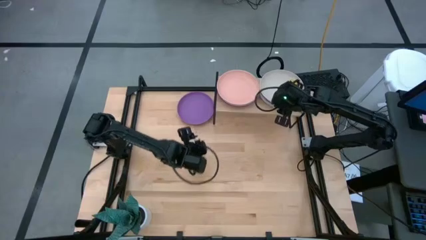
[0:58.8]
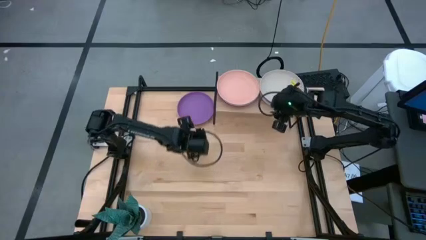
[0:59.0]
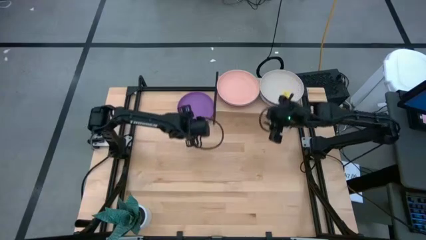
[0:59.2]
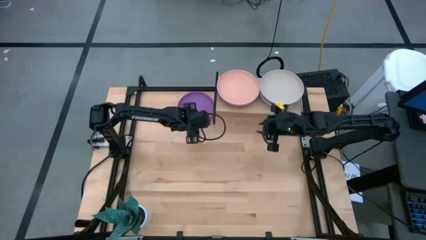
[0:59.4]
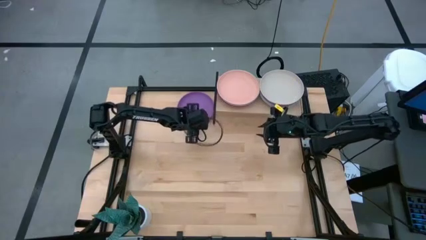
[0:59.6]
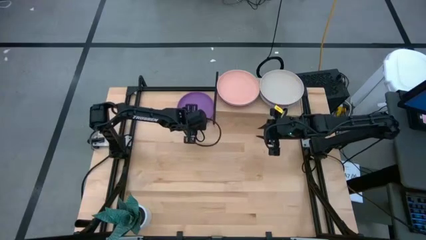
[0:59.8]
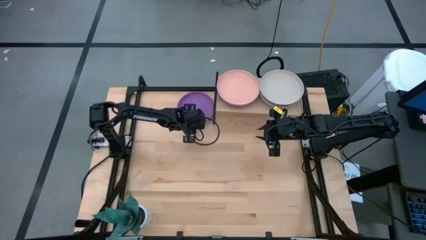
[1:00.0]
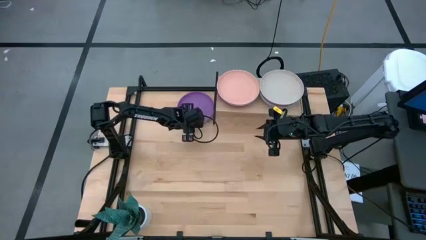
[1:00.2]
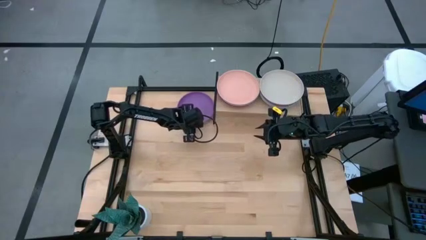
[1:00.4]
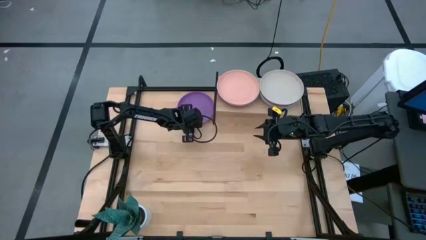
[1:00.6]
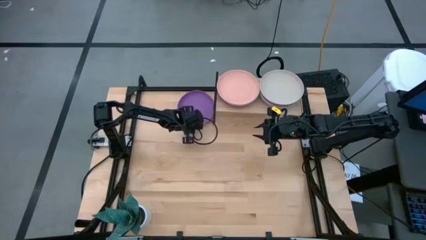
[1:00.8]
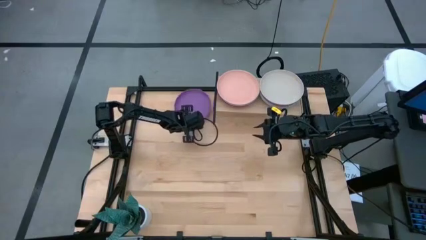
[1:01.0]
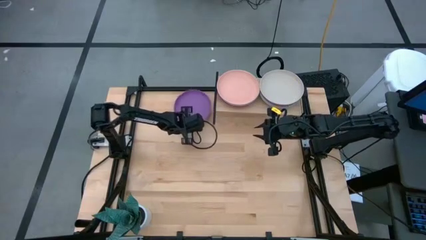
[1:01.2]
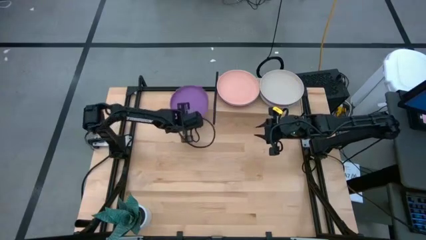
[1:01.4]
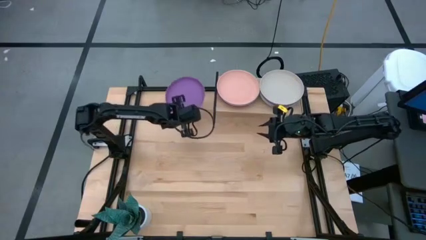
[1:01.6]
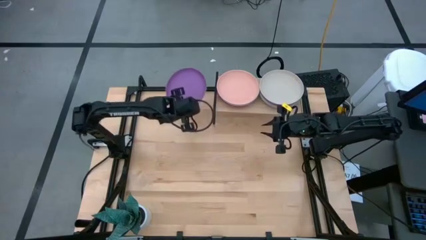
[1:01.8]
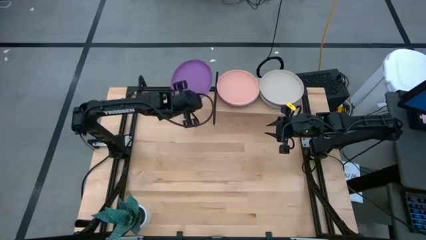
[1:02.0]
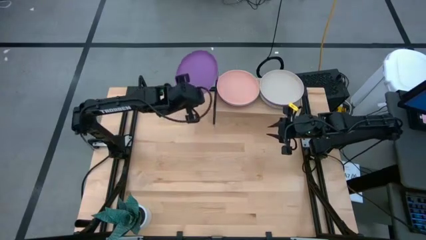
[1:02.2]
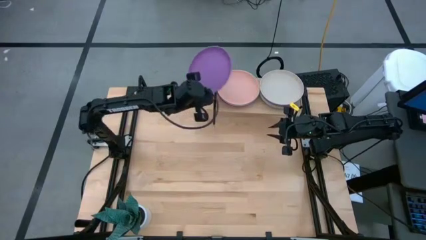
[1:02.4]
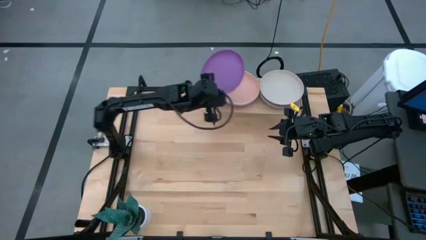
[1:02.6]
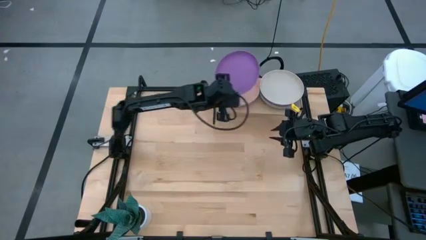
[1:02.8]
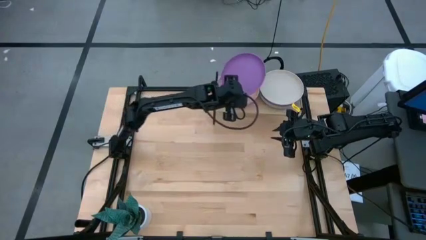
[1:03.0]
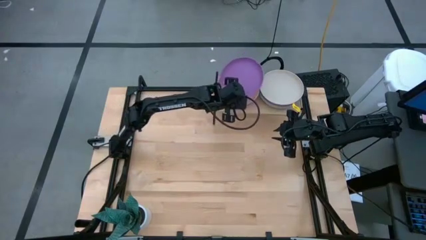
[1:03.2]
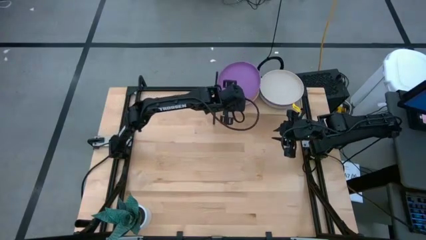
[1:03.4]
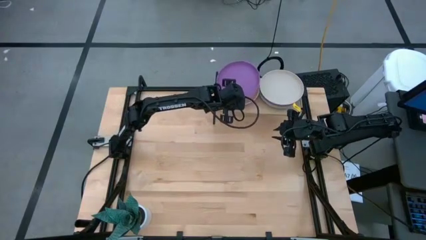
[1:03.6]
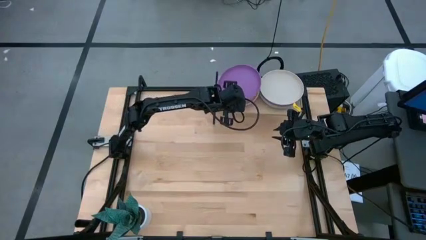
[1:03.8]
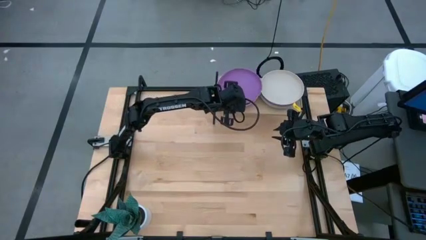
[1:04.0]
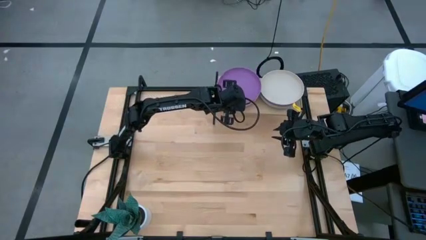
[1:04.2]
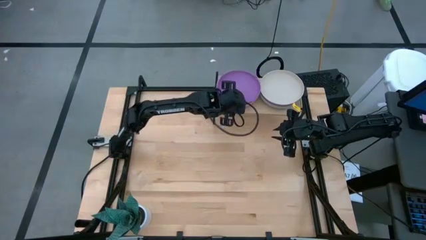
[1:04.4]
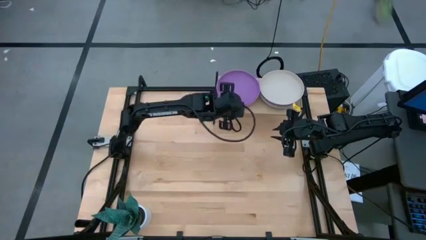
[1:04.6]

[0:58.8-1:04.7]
Task: Place and stack plates onto a shelf
Stack the violet plate on top of the light orange plate on the shelf

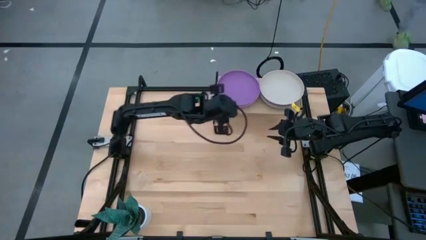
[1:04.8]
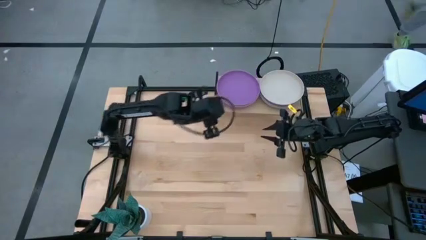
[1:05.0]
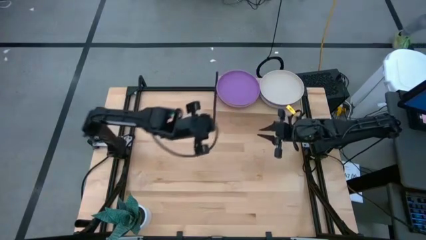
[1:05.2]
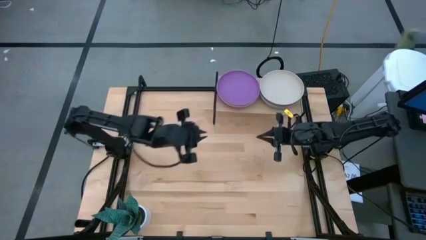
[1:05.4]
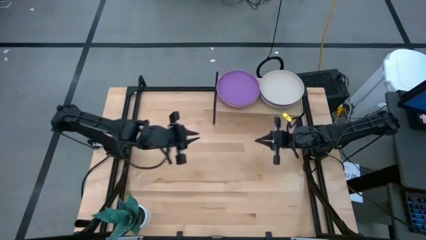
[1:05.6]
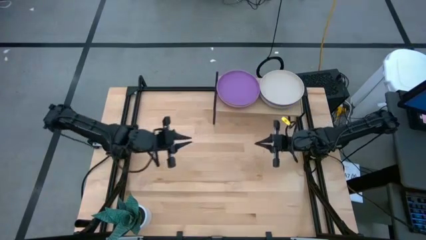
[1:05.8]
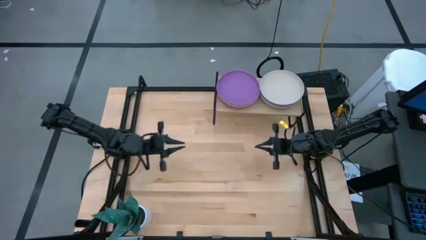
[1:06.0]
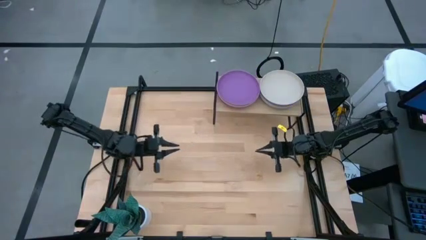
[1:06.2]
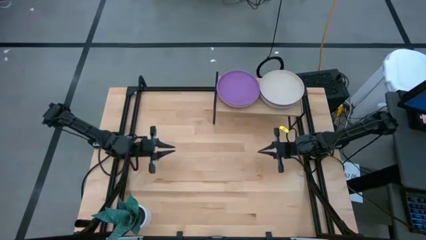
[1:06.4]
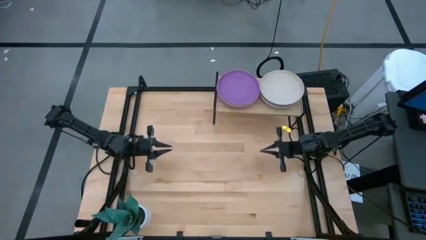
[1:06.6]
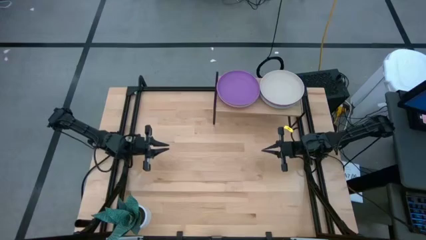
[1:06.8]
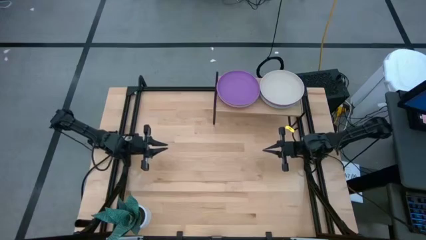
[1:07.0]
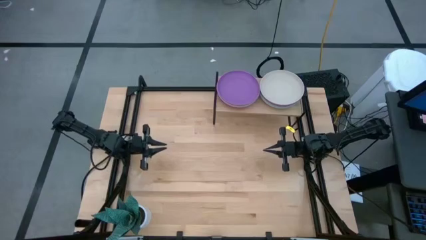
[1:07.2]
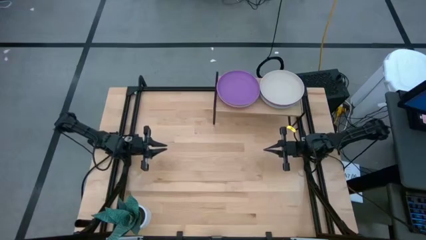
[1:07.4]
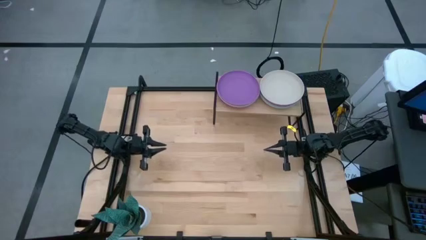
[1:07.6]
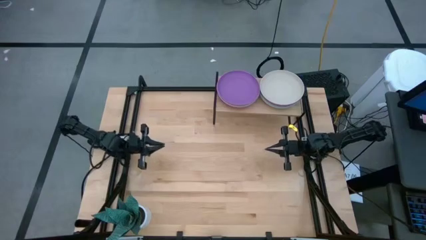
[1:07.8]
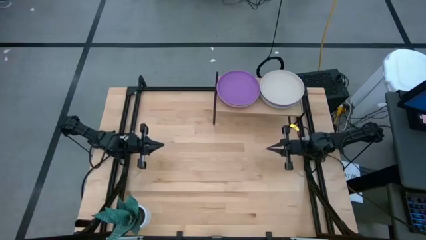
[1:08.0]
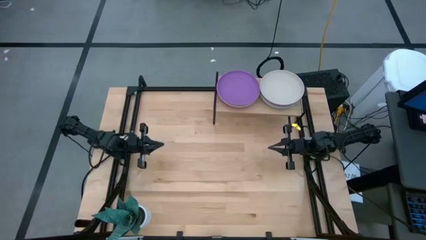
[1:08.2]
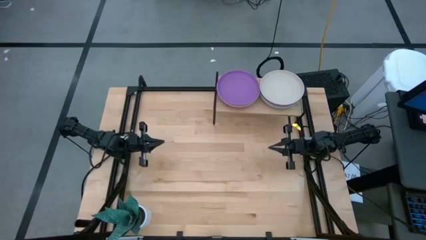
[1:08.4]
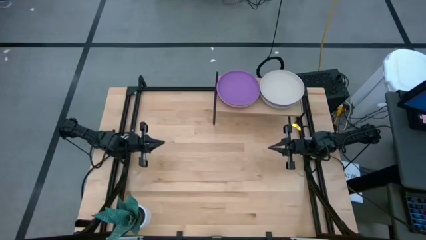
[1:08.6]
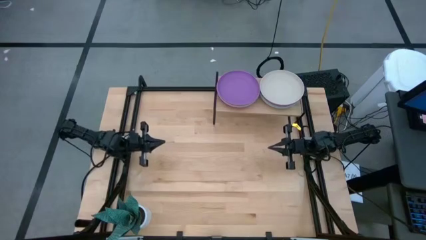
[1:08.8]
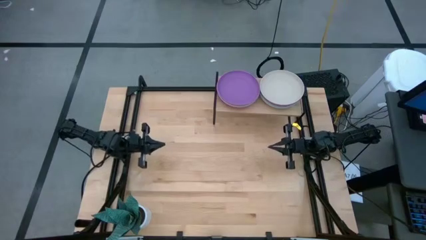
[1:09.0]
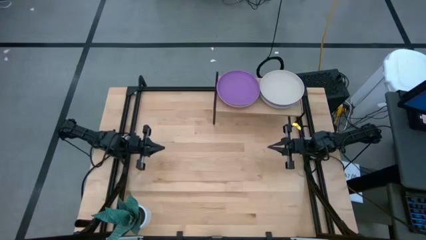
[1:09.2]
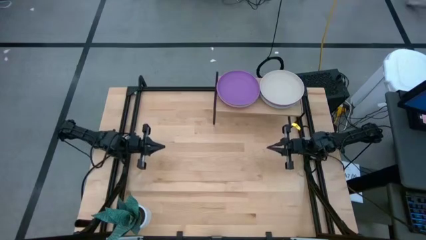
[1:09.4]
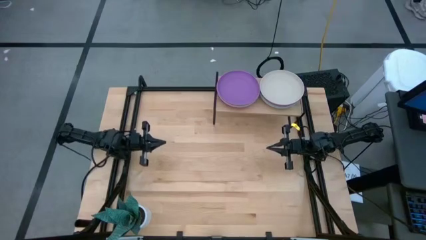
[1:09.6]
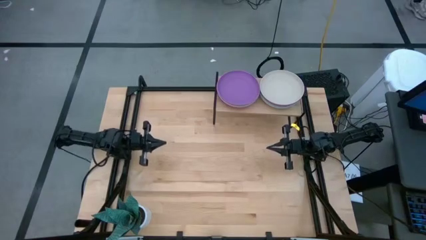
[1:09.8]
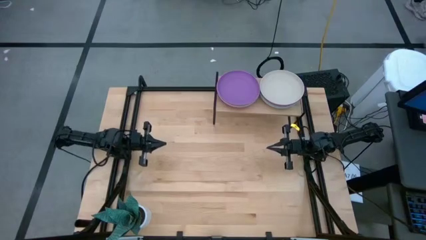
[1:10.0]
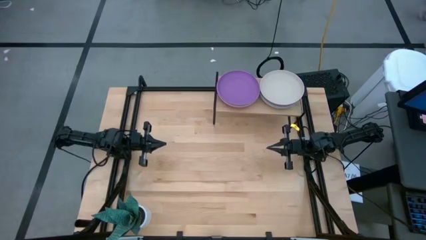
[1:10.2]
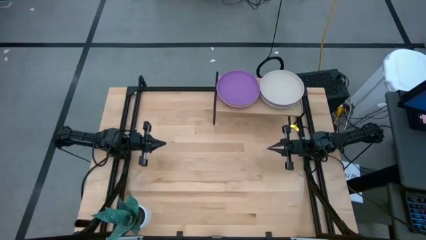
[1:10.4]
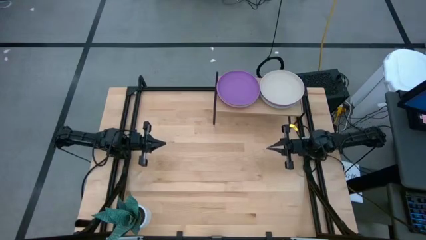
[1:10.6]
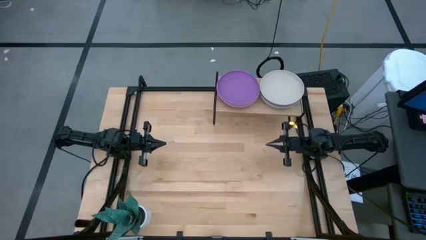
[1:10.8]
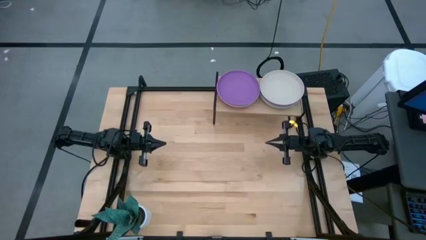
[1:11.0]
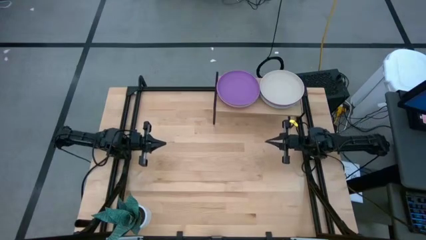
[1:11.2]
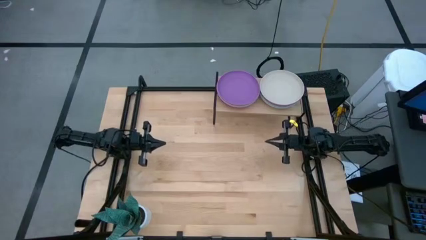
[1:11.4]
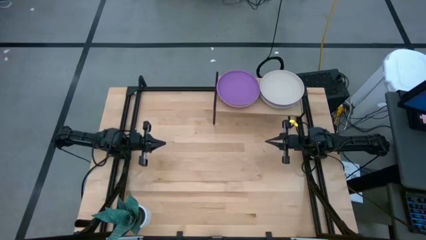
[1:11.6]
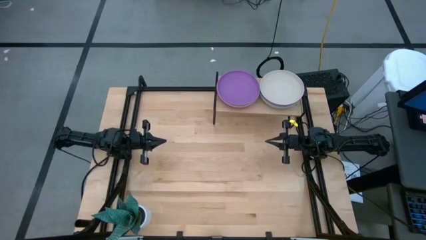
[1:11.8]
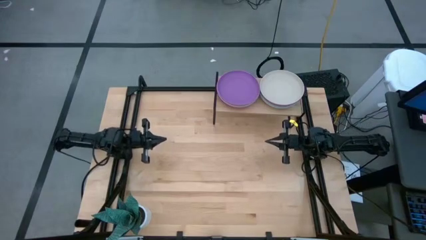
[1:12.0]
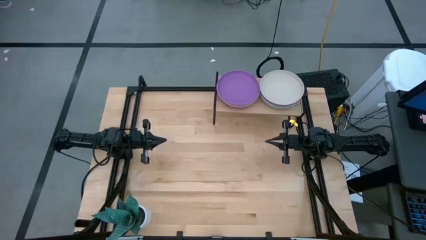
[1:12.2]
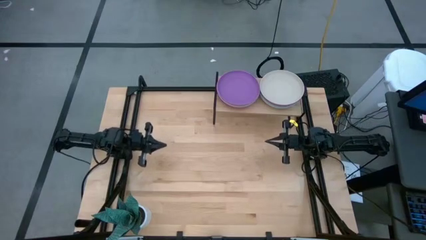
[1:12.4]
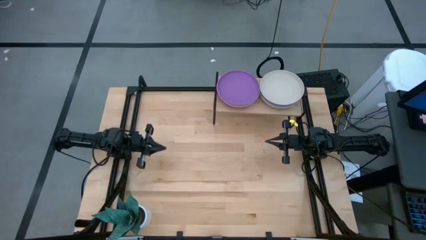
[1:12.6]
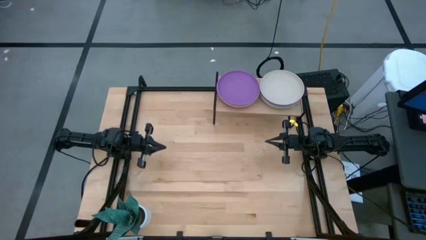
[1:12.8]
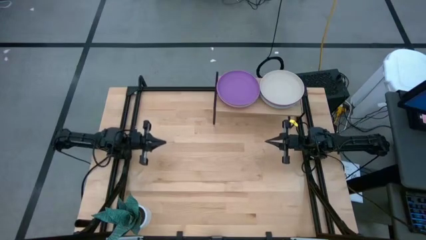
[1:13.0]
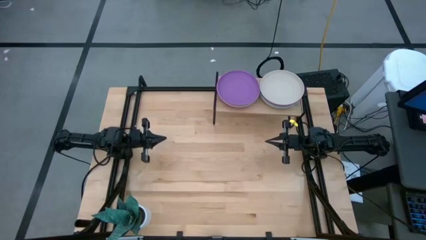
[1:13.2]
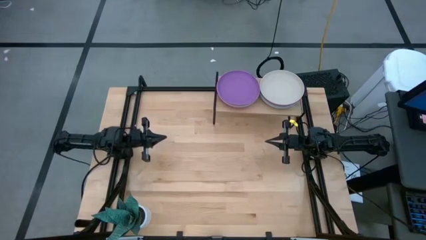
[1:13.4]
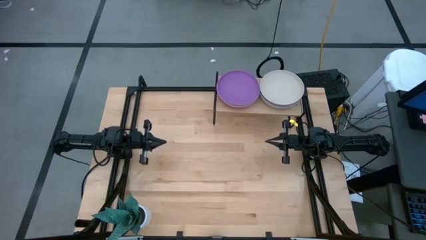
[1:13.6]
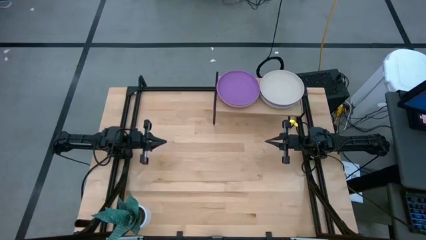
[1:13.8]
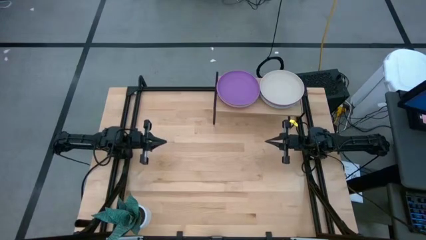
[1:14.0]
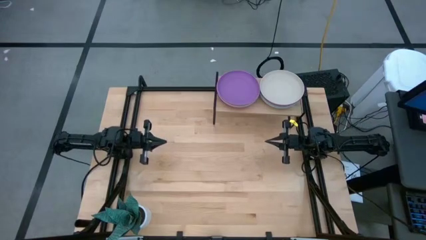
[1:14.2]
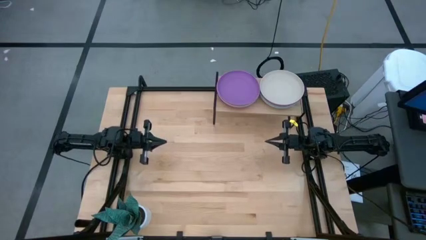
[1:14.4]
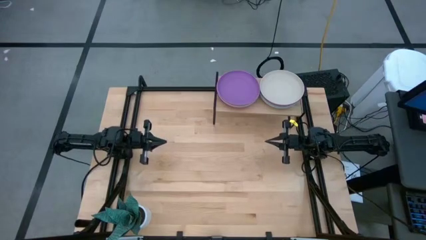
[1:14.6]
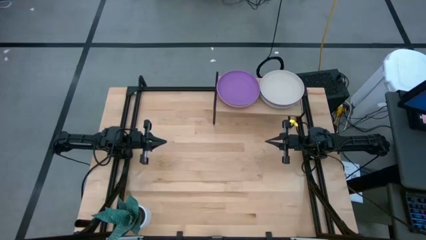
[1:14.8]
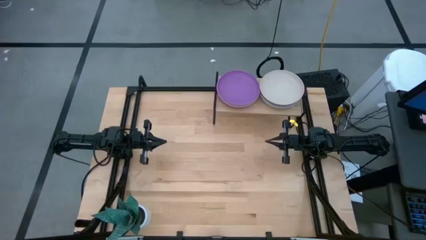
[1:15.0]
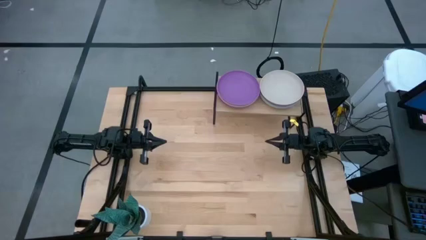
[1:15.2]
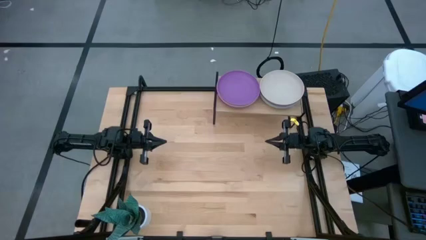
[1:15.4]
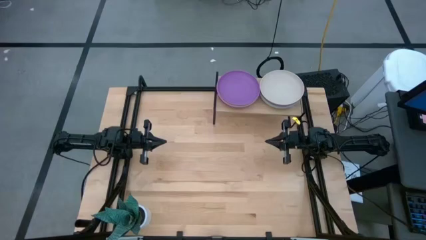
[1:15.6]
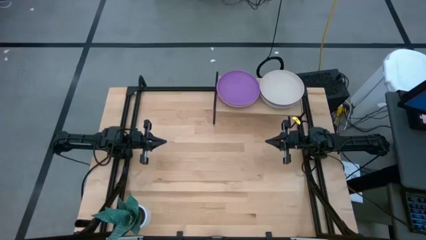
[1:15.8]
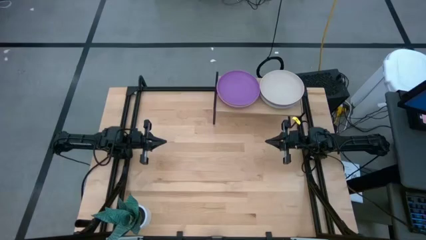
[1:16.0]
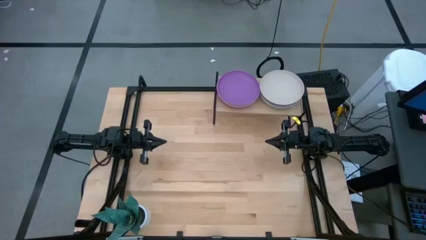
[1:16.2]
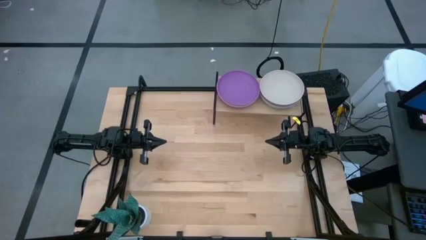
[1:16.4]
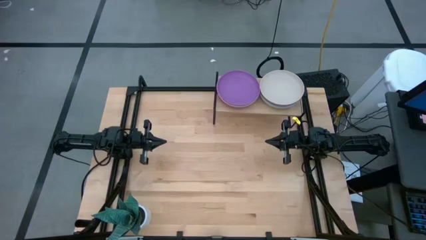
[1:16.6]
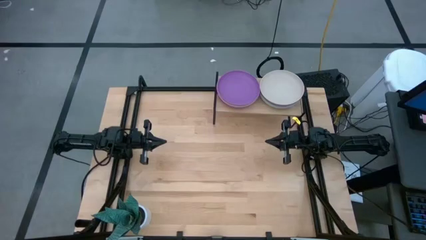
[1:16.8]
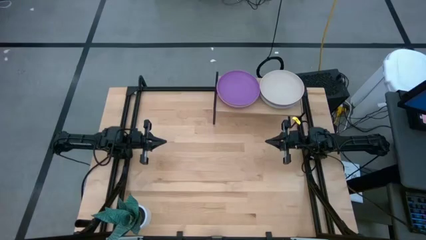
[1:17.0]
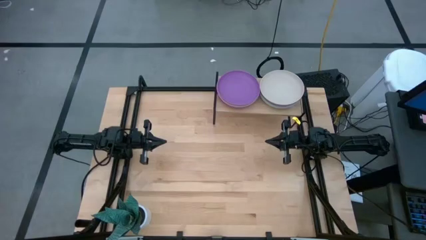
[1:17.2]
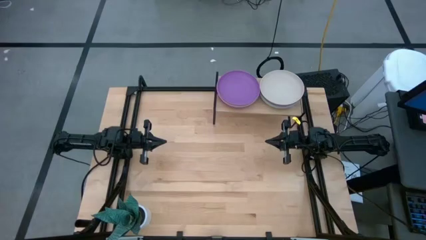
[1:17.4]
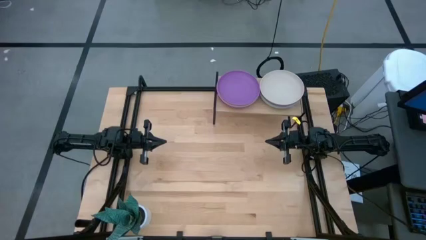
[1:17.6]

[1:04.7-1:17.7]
Return to Home Position
